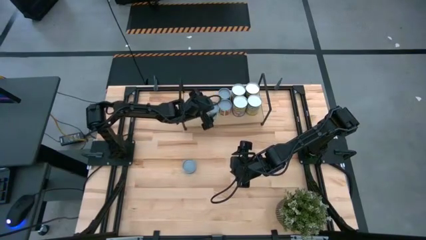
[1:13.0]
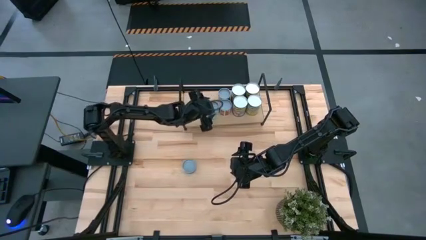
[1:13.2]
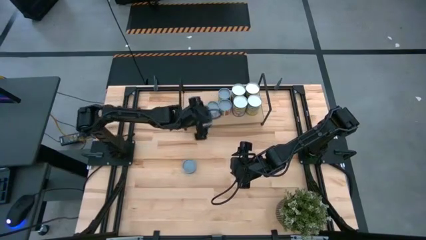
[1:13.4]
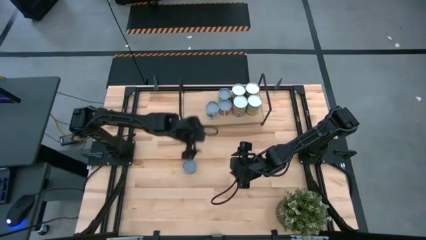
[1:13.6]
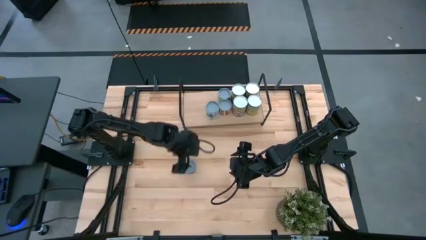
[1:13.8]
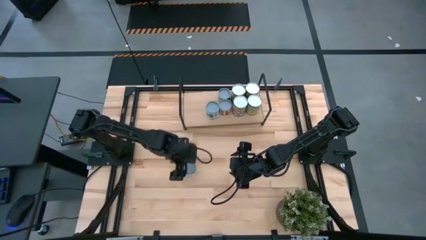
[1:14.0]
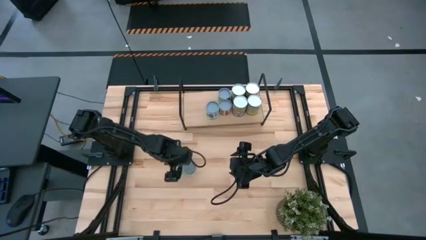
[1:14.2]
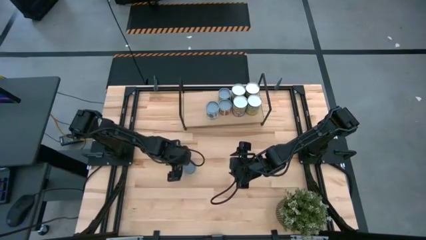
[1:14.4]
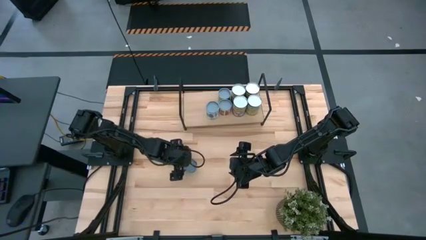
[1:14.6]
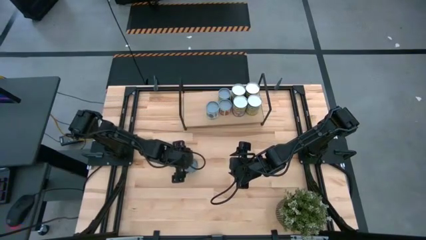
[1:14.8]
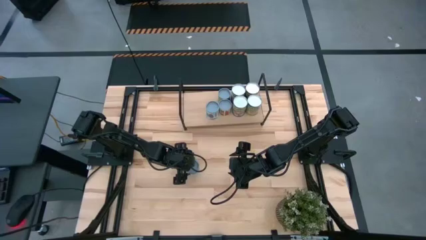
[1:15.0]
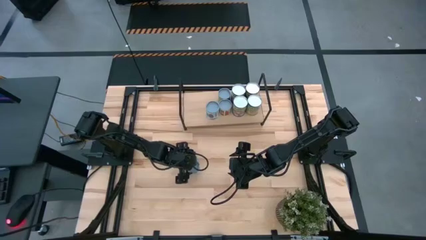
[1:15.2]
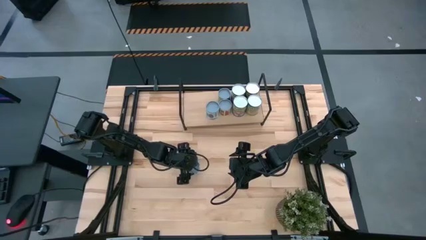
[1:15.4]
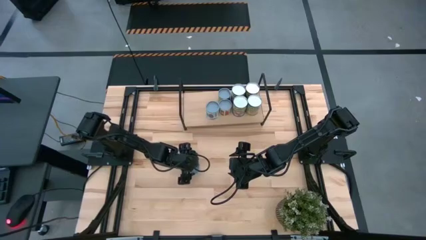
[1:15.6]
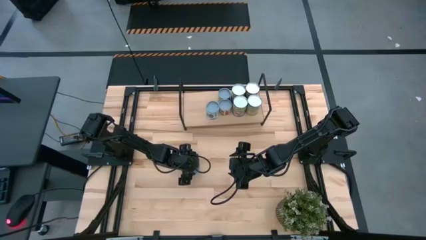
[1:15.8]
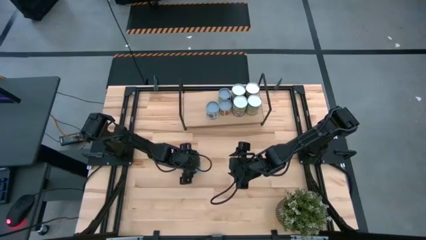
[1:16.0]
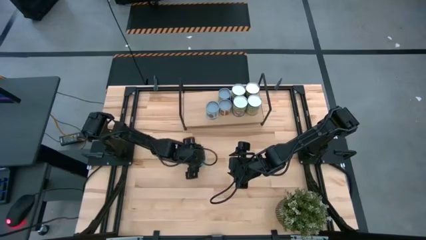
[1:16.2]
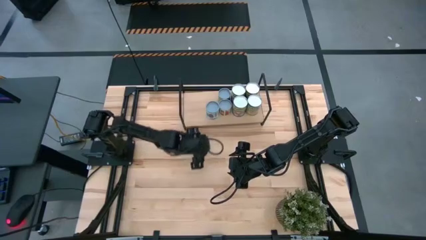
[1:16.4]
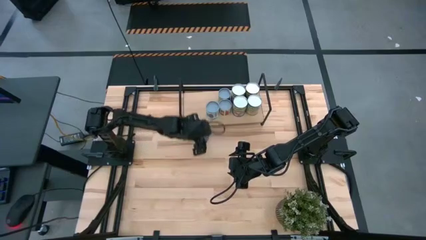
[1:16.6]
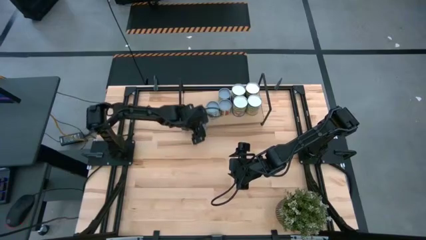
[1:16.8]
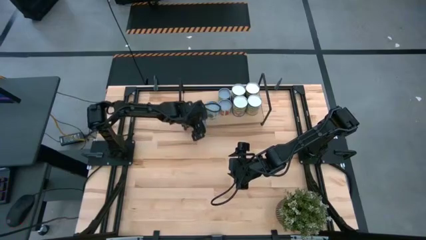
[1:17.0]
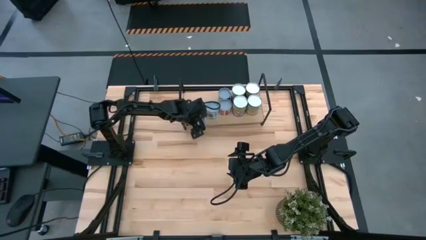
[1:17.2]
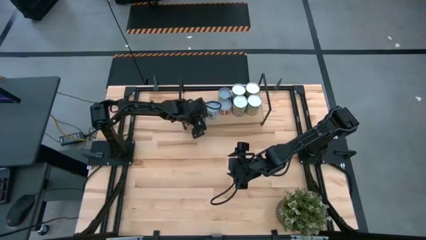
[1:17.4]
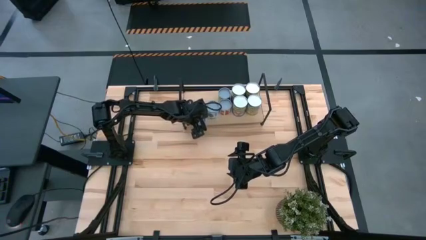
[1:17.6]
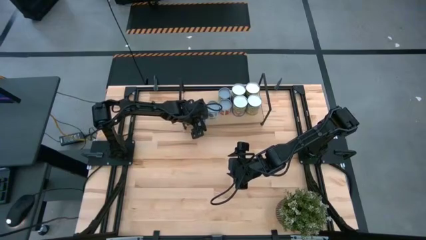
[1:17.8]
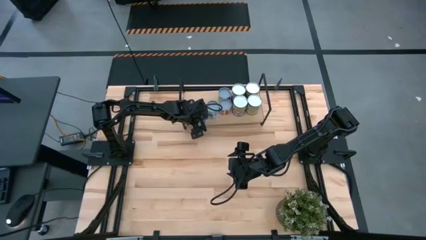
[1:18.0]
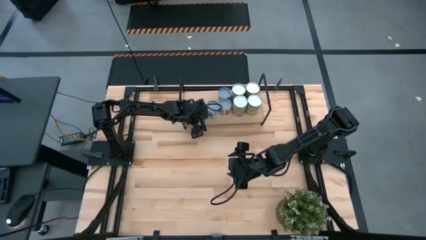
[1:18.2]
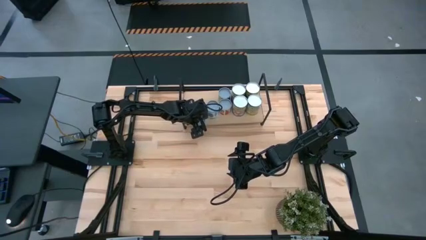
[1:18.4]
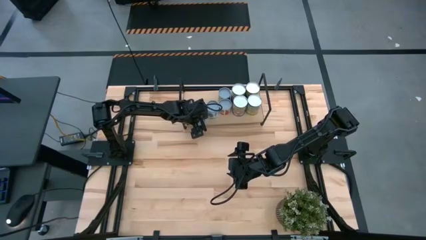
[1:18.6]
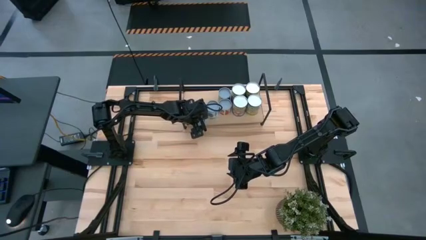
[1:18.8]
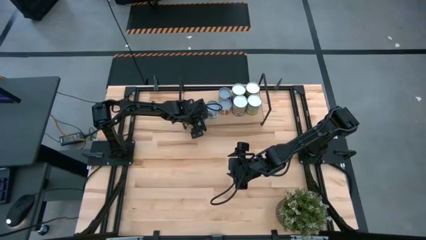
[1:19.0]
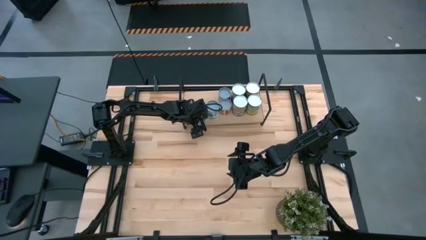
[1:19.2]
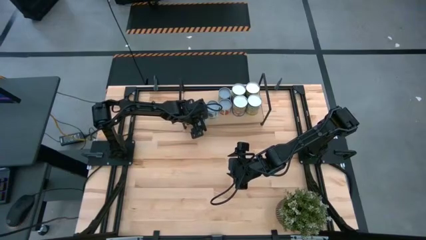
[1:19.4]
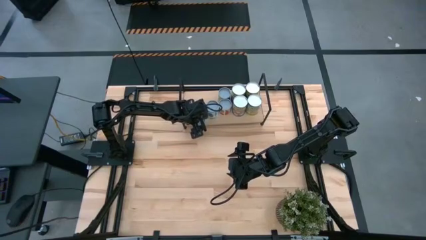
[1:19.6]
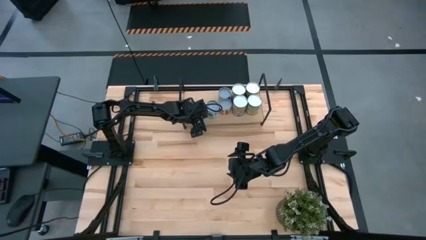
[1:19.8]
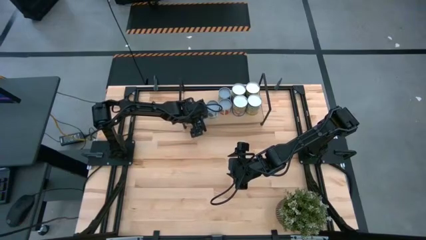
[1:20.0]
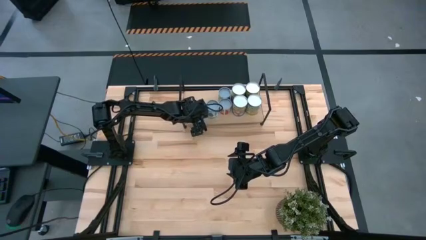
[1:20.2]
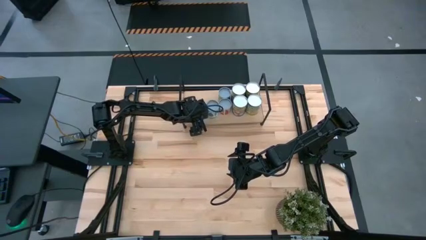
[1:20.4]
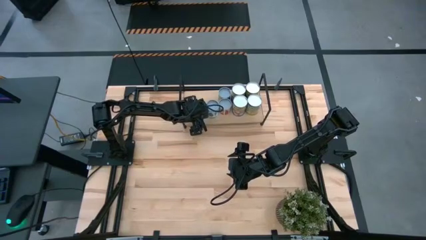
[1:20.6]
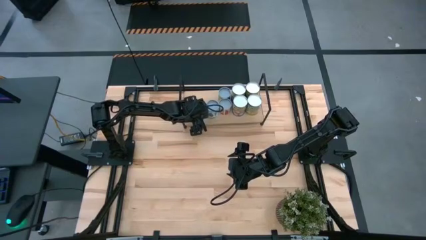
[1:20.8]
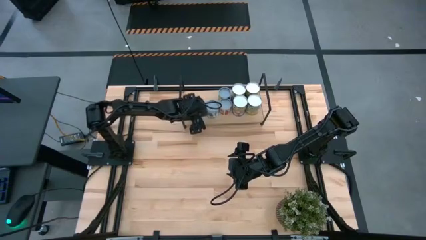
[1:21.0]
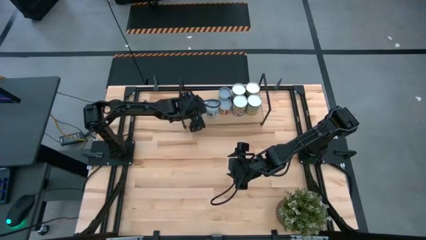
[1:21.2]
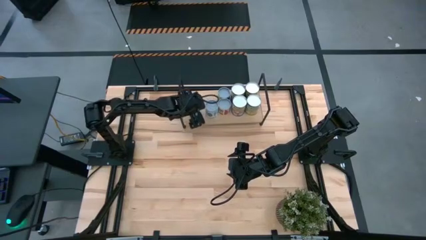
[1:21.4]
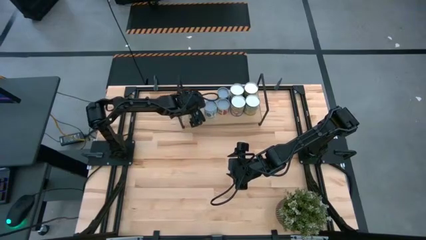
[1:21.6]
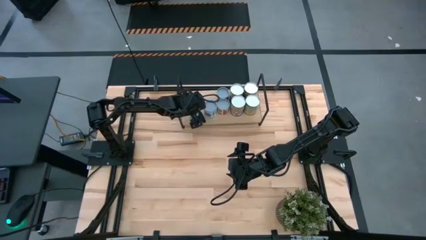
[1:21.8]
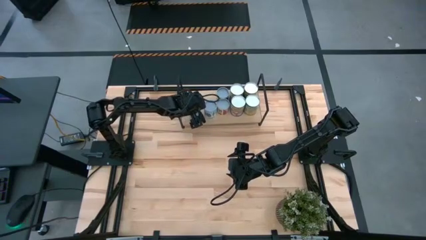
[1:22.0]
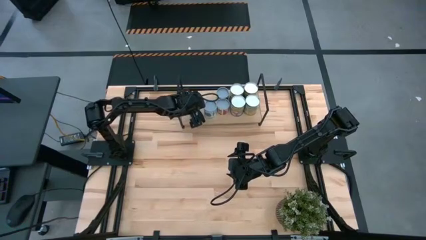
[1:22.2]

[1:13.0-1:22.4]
Task: Pick and place cans onto a shelf
Put the canned tuna on the shelf

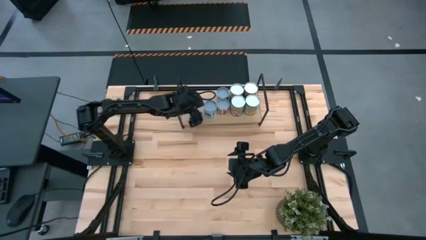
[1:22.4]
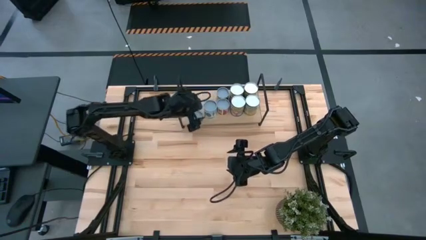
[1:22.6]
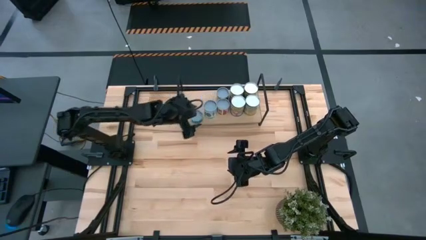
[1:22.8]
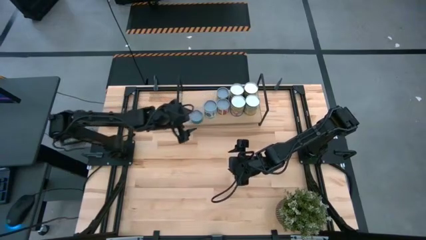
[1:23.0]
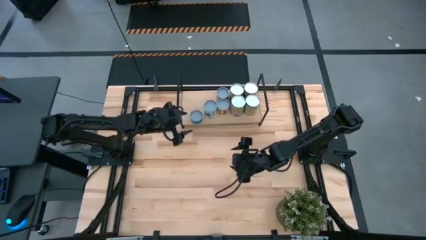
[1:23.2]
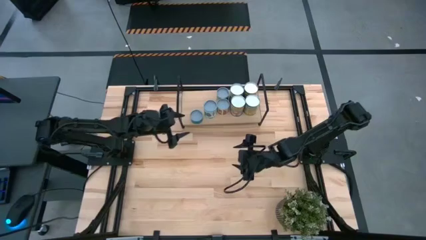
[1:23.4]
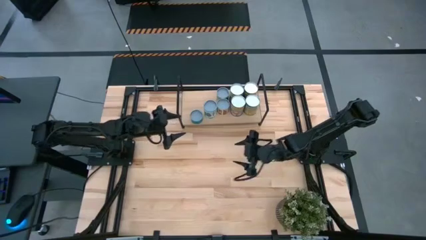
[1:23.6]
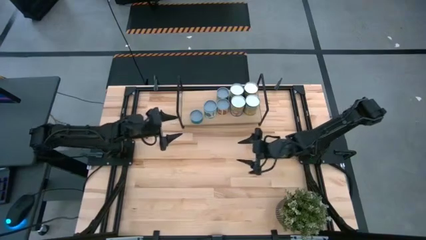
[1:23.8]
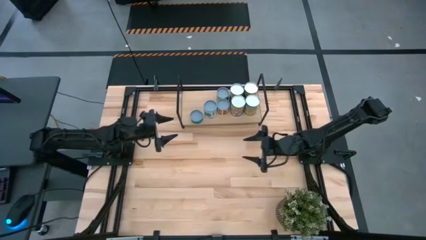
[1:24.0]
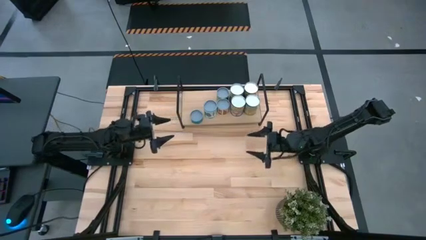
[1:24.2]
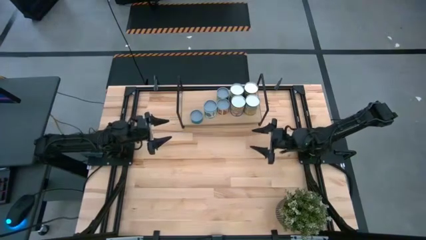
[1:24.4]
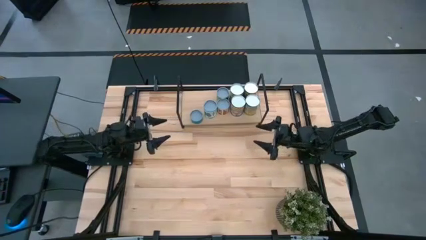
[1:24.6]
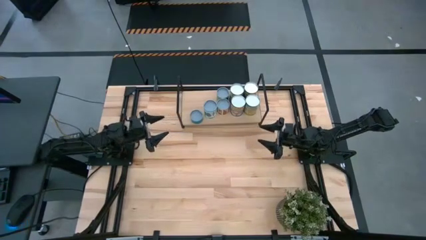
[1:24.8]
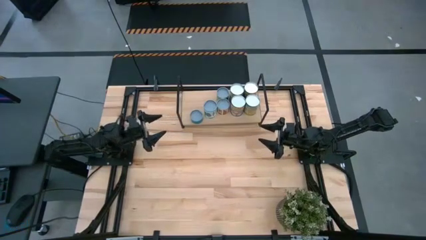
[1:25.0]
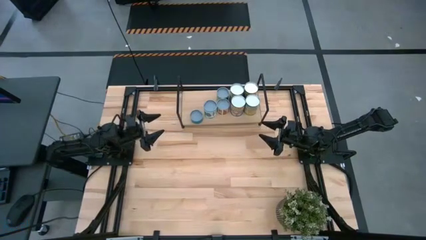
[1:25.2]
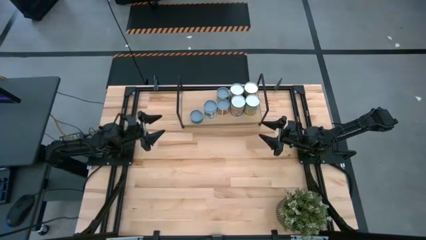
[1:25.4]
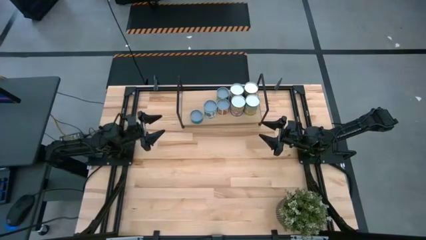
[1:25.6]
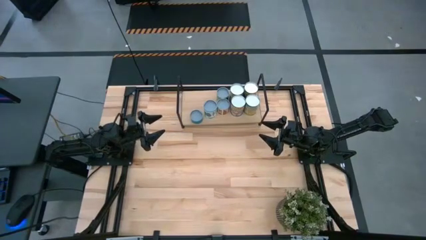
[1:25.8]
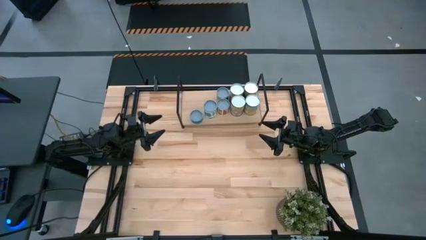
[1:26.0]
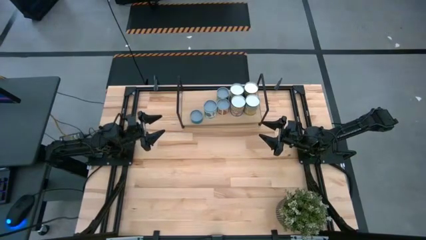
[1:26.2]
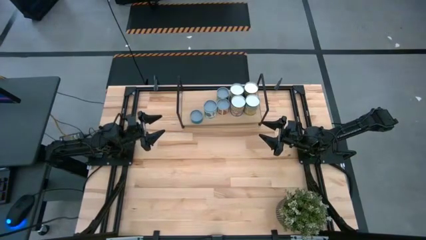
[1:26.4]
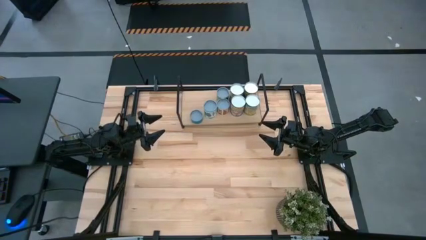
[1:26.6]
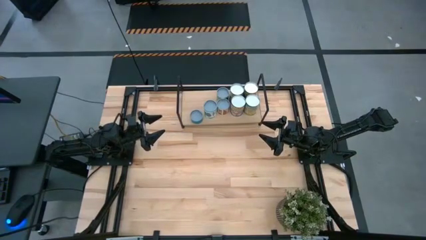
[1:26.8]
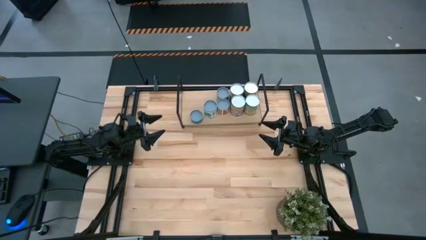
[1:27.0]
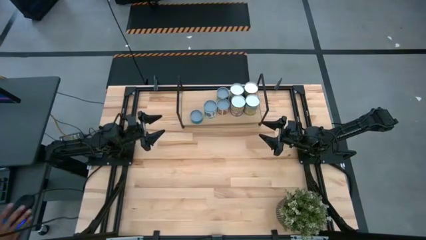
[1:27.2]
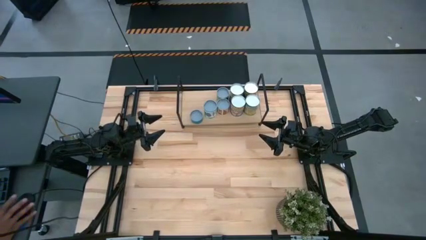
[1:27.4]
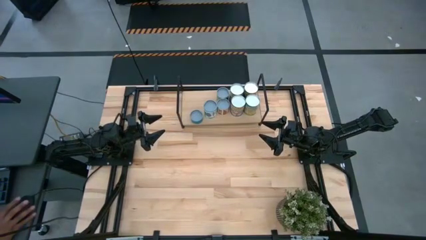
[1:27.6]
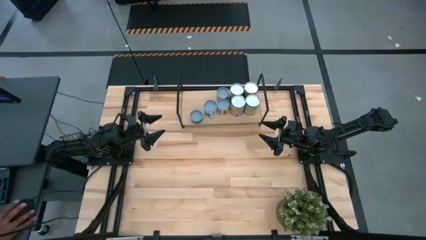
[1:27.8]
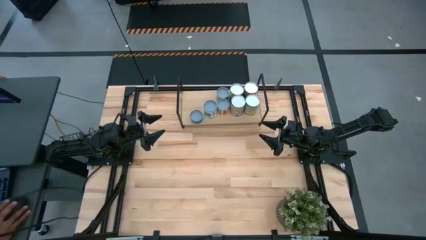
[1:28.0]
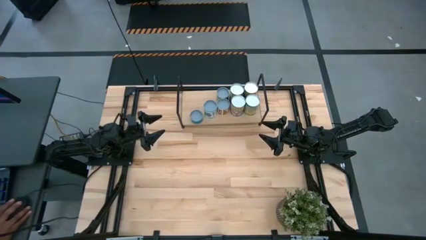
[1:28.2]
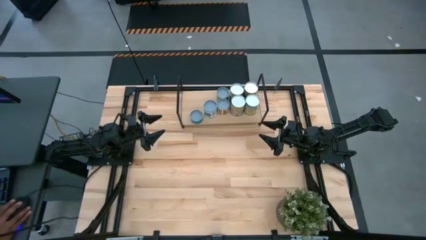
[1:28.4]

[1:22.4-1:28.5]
Return to Home Position
